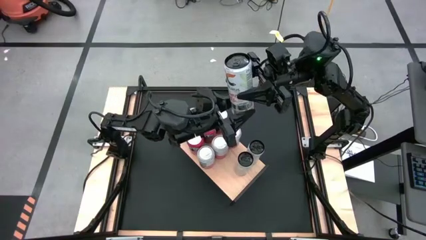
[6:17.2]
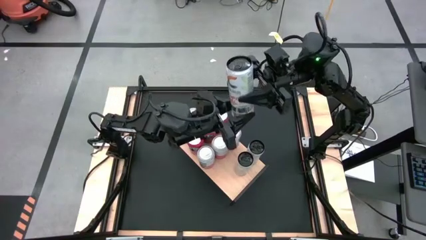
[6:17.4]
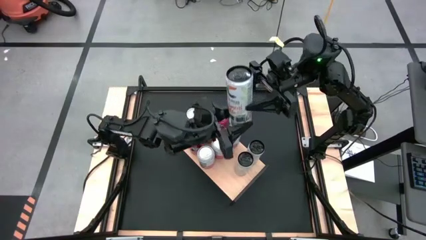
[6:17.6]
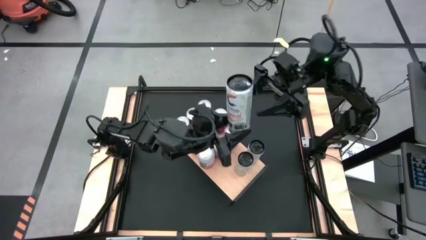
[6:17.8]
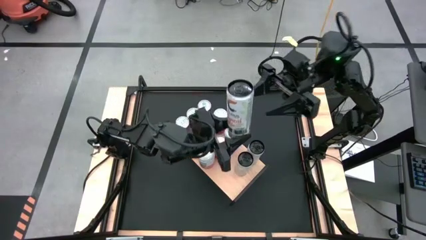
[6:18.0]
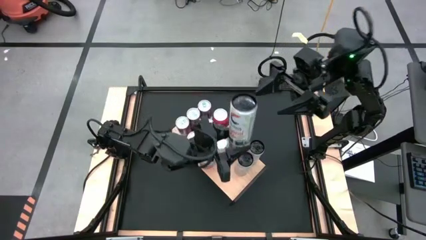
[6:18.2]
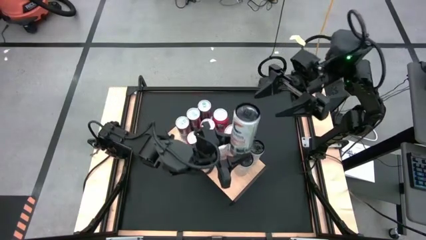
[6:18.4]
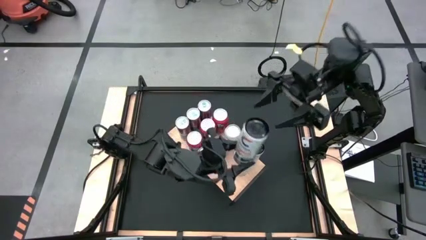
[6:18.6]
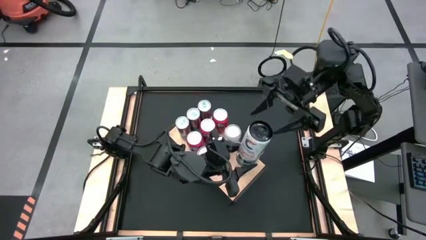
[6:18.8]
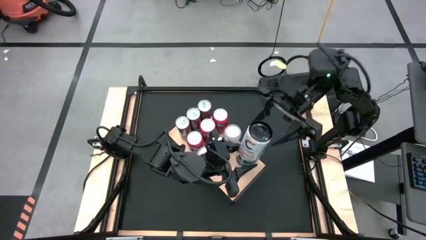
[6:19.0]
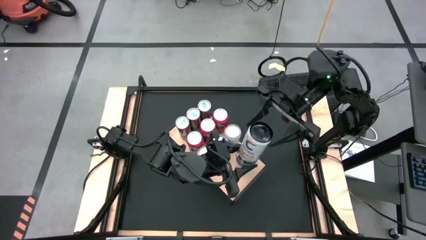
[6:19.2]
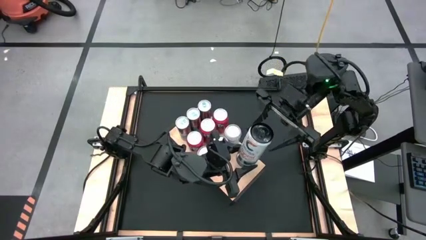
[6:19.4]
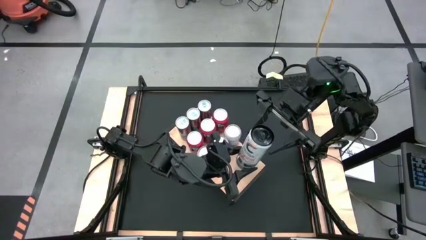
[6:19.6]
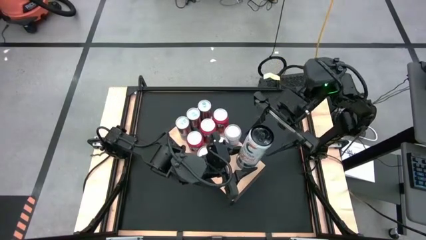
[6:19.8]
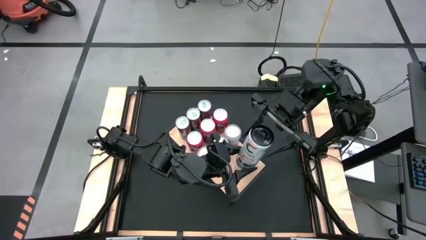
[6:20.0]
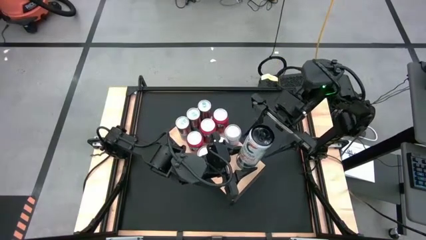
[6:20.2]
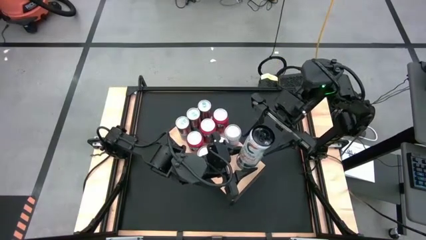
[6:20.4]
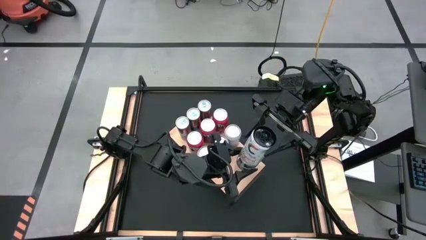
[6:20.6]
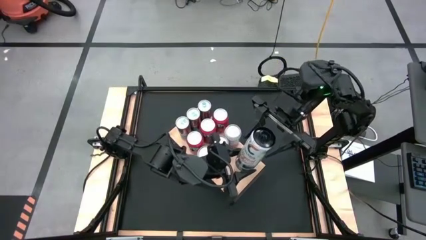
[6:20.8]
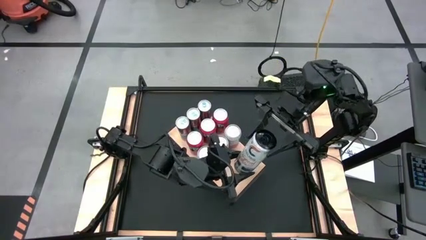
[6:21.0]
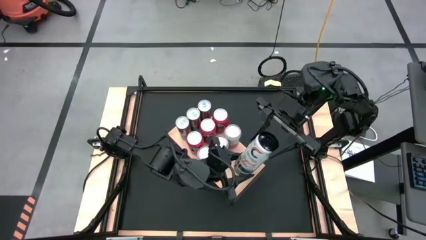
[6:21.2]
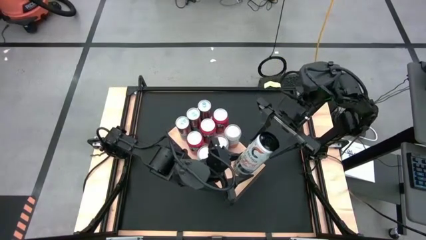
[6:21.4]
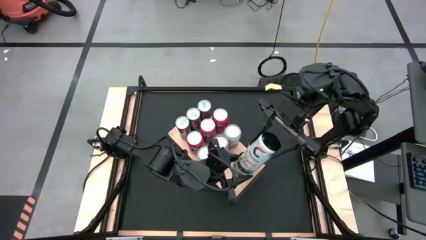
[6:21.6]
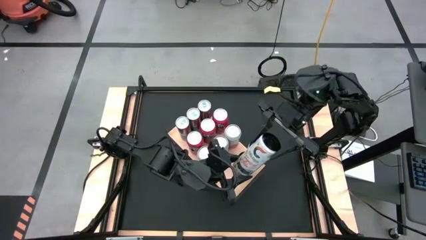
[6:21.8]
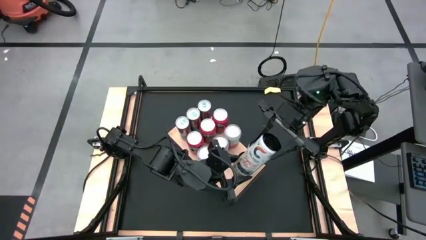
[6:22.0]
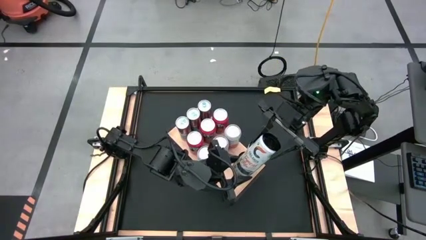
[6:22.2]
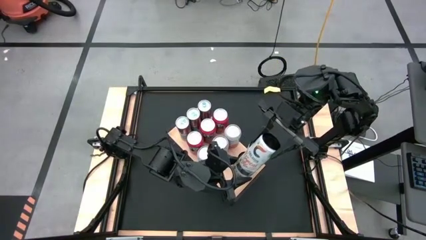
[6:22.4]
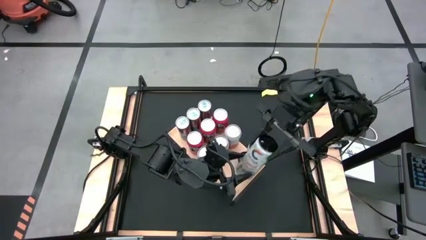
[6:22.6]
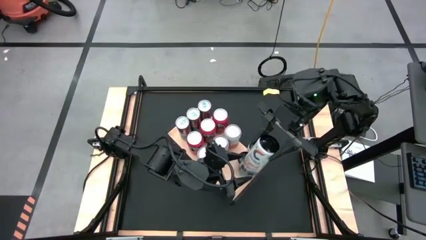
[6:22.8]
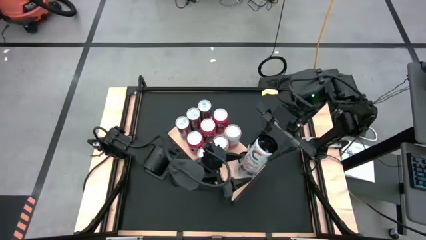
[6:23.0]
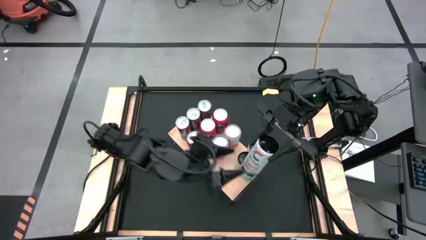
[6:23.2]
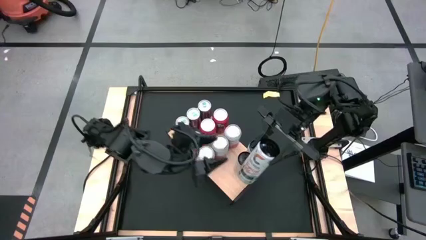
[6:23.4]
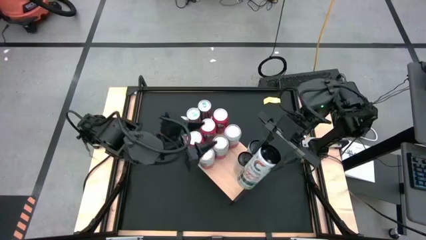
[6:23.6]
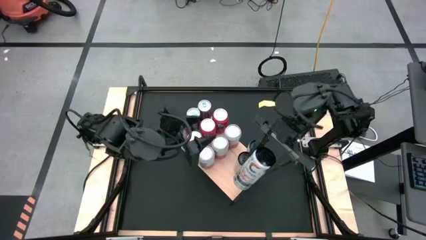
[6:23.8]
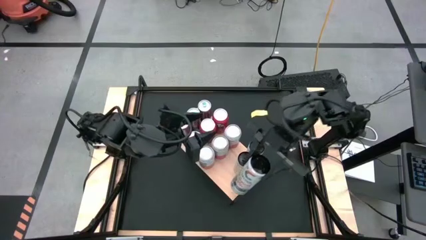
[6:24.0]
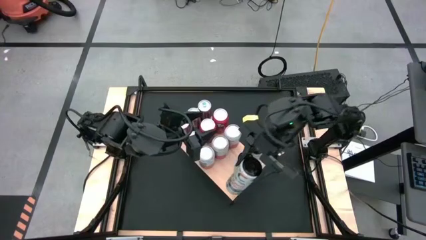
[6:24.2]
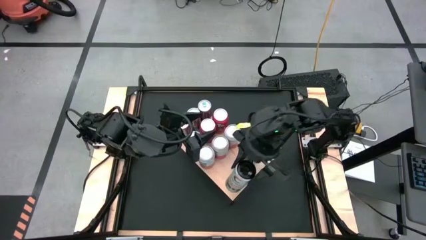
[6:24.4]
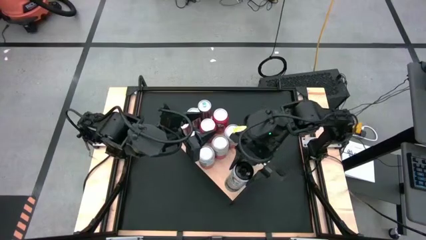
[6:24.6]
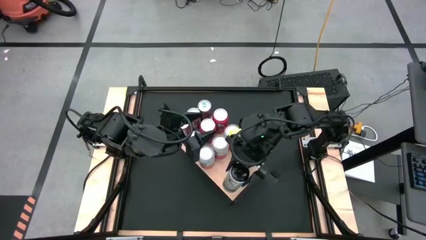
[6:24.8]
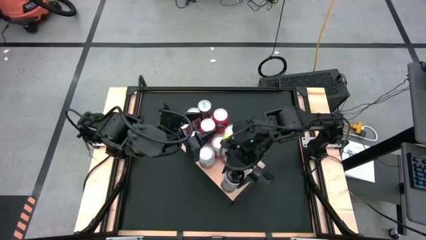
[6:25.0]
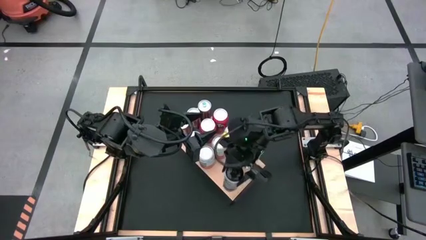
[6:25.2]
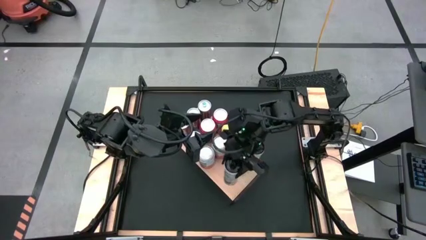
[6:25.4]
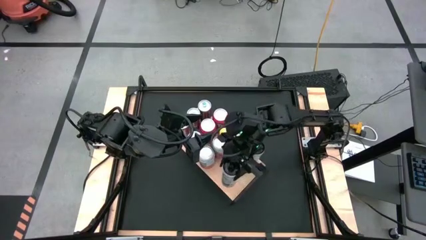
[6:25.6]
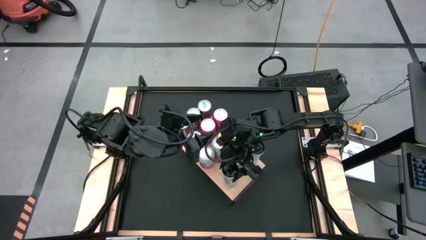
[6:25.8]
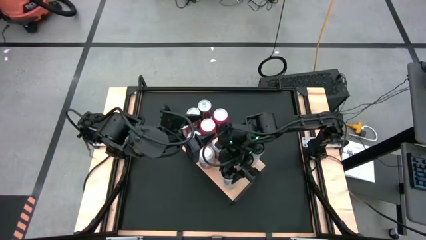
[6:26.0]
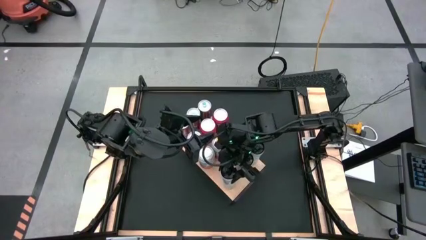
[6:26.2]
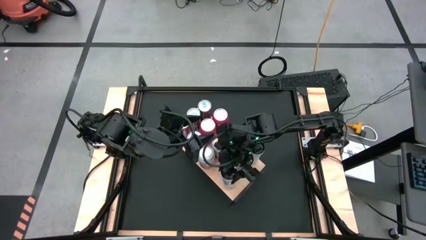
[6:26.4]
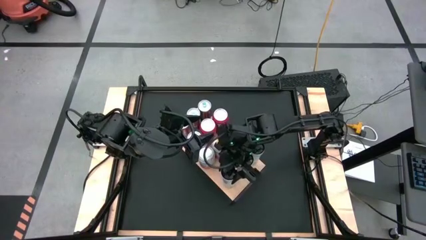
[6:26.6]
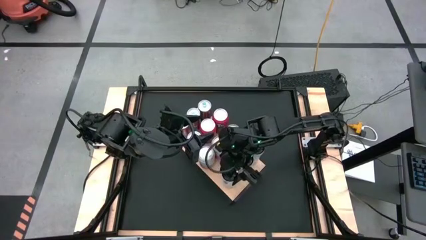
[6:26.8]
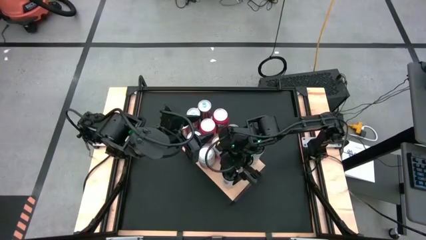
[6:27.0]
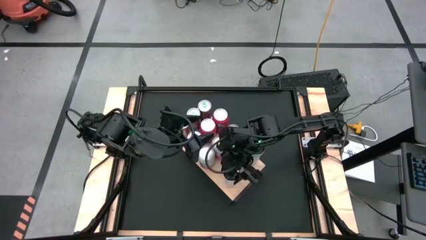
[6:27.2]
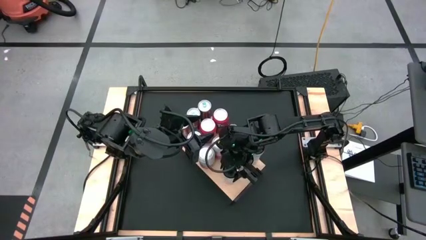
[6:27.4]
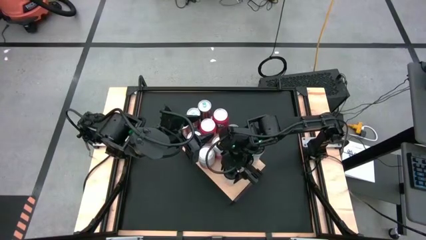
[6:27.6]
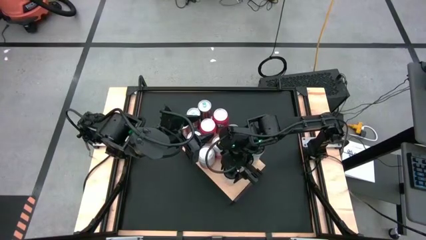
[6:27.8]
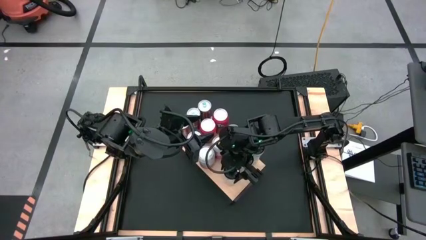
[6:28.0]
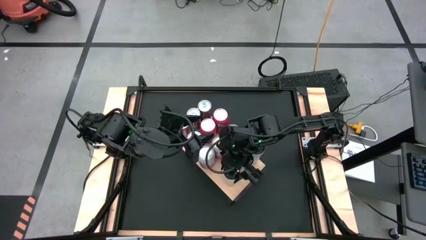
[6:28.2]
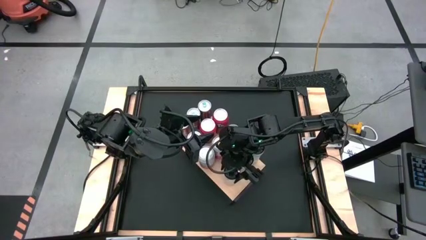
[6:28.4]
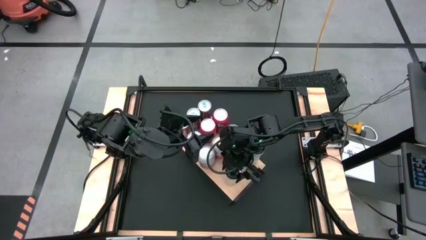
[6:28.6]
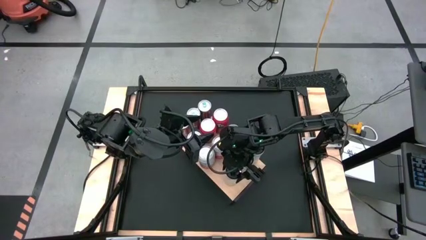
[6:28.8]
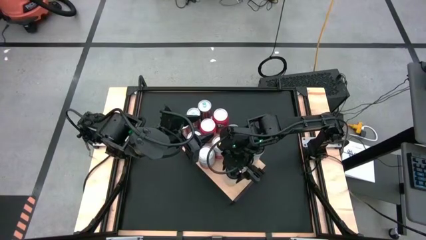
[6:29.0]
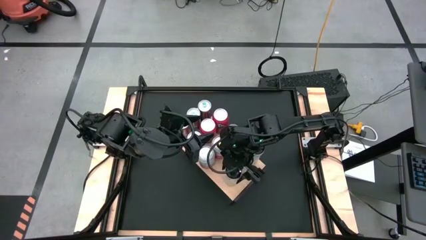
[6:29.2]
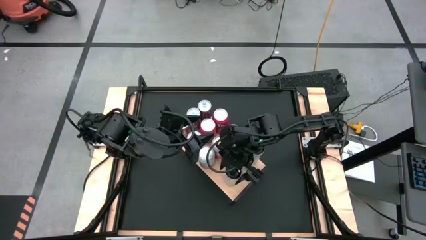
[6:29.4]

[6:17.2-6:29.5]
Task: Place canned beverage on shelf
Put the white soda can on the shelf aligned with the other white soda cans

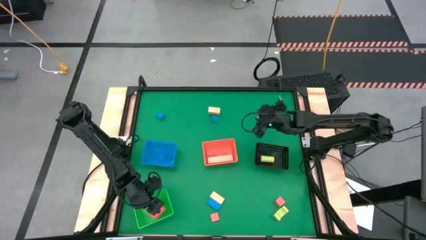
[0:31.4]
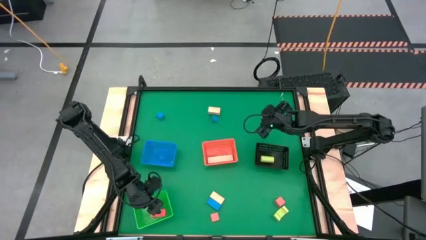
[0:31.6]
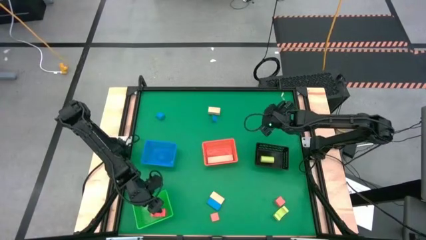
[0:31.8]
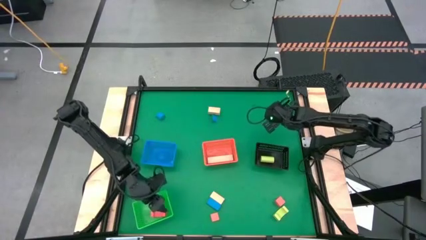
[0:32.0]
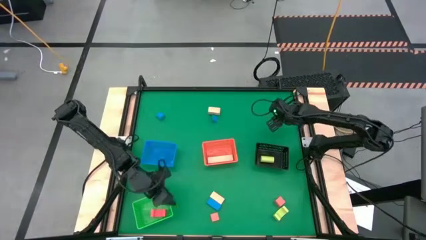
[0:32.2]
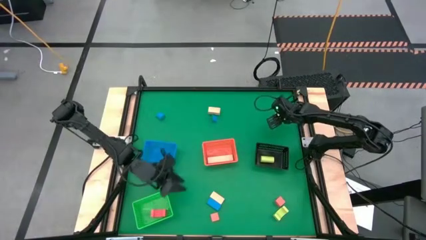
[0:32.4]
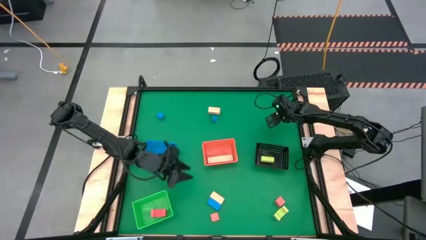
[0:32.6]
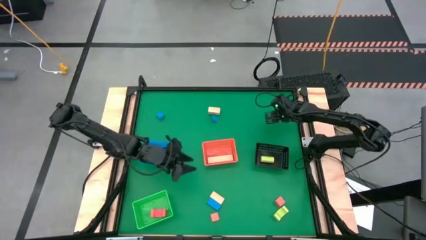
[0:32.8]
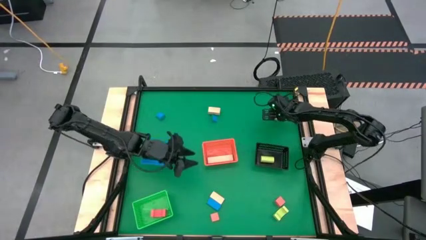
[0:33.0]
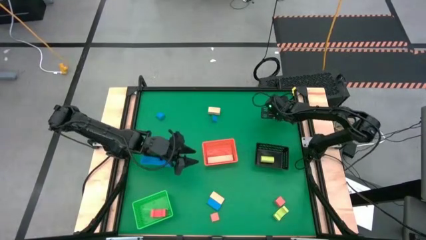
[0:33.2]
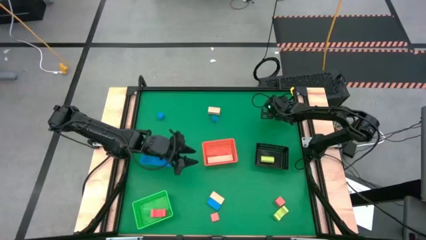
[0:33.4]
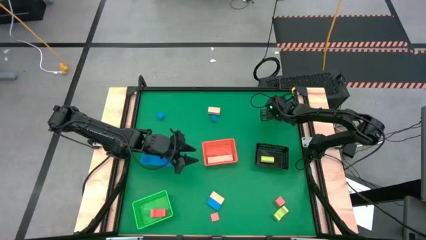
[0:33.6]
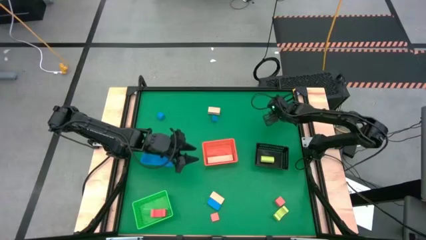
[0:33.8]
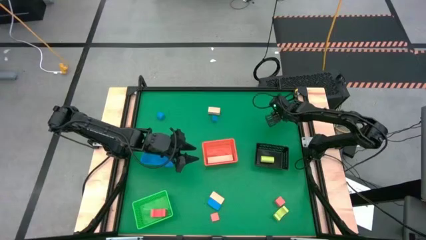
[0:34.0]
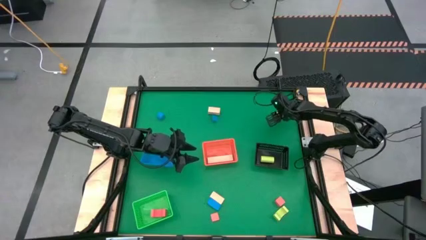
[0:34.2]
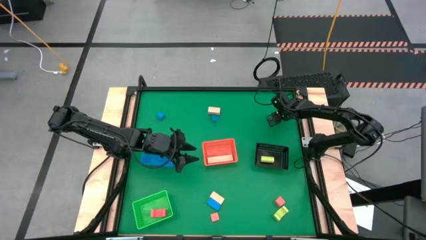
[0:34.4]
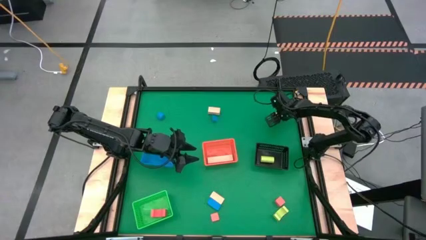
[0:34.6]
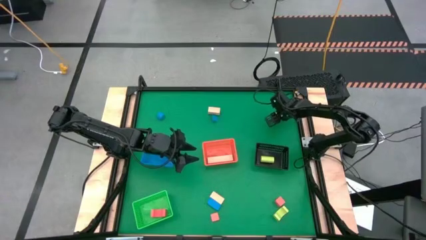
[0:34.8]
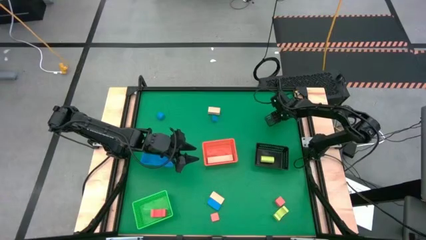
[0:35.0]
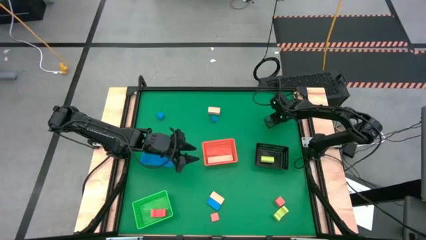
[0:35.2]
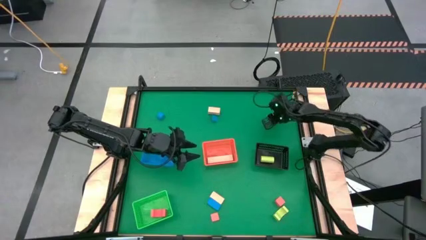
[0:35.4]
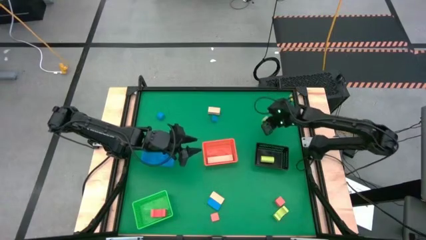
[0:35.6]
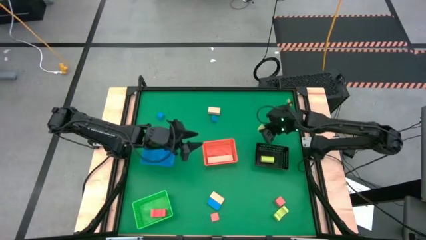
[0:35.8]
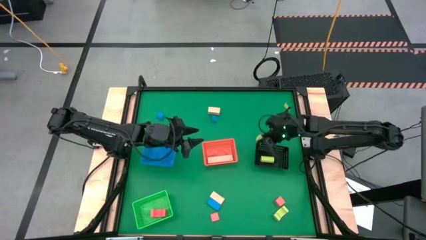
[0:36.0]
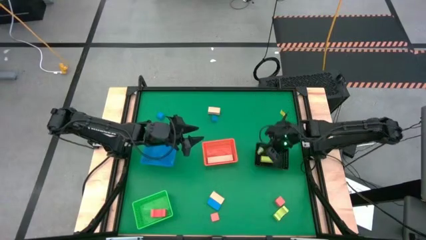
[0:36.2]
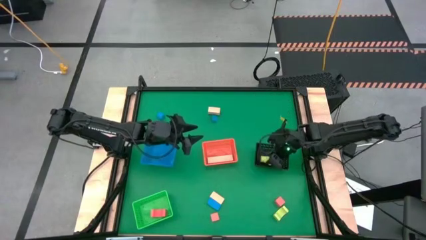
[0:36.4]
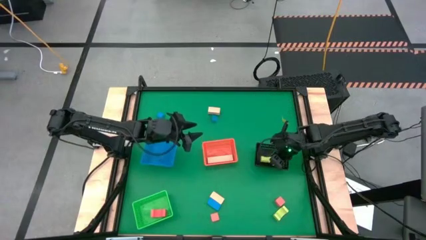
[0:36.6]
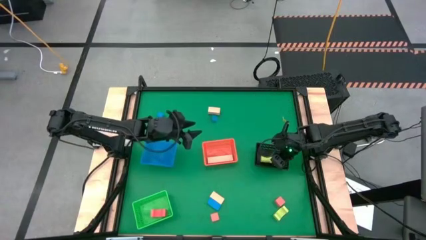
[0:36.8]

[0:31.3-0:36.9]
Task: Sort & place blocks by color
Put the top green block into the black bin
